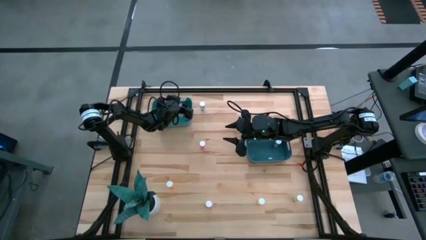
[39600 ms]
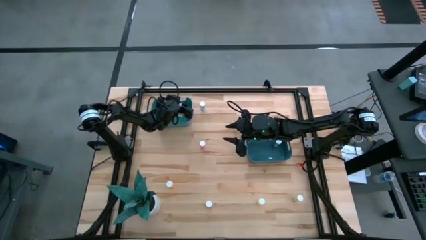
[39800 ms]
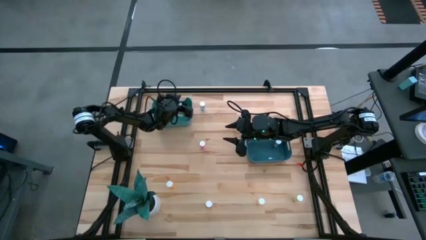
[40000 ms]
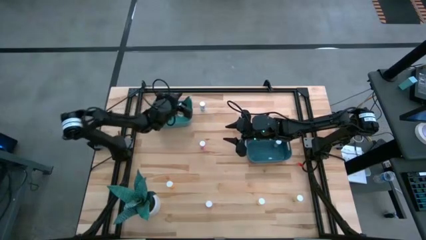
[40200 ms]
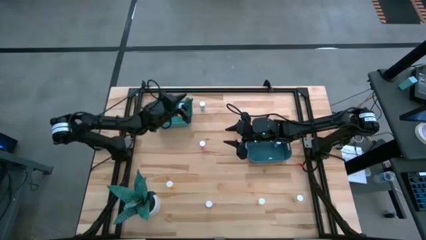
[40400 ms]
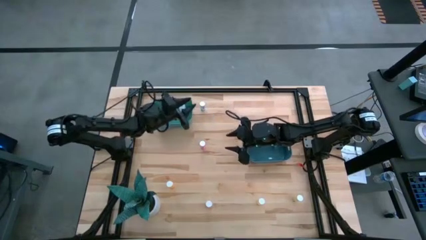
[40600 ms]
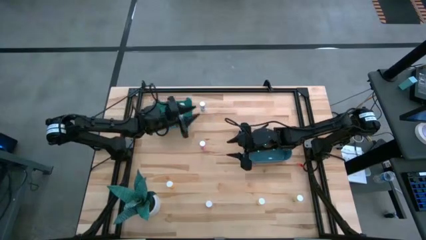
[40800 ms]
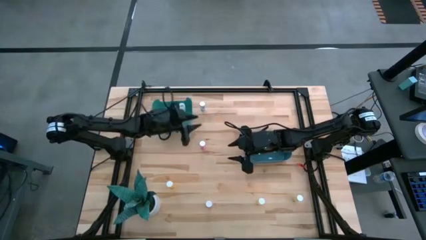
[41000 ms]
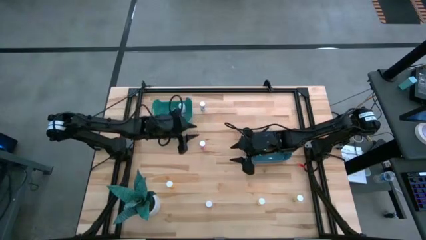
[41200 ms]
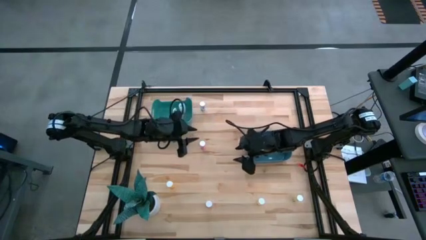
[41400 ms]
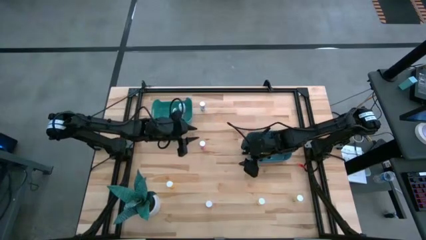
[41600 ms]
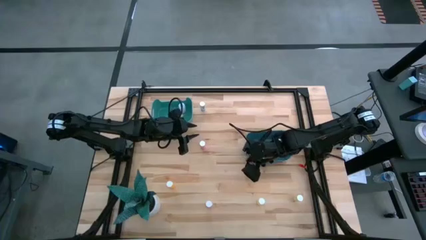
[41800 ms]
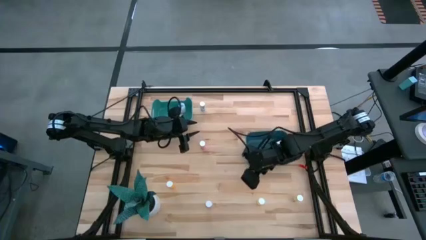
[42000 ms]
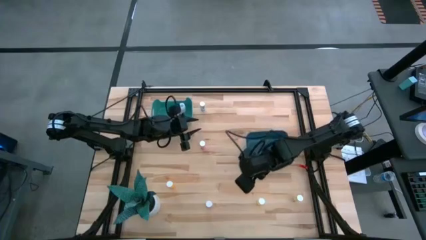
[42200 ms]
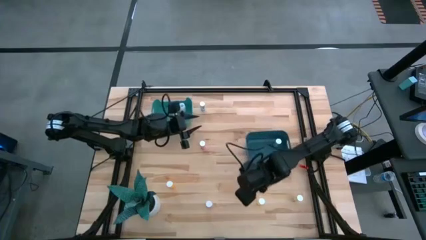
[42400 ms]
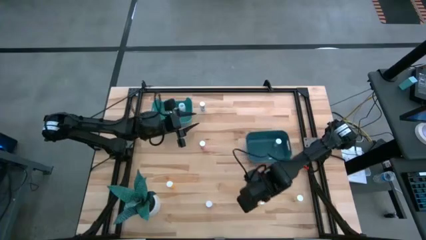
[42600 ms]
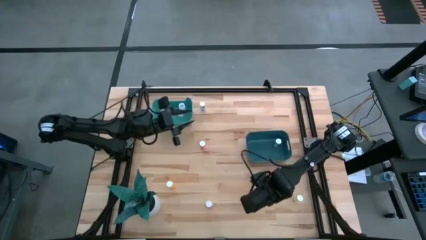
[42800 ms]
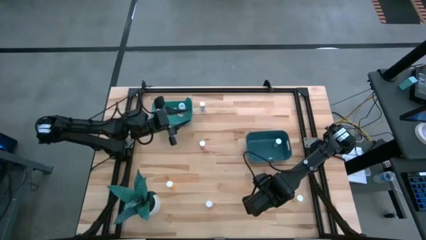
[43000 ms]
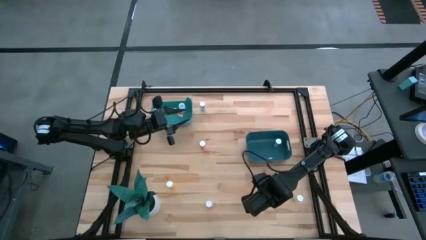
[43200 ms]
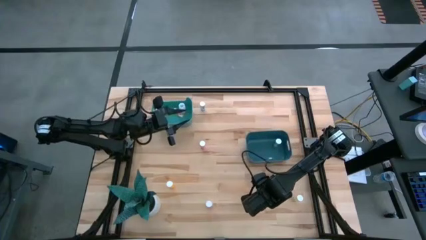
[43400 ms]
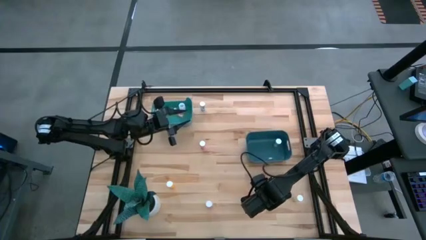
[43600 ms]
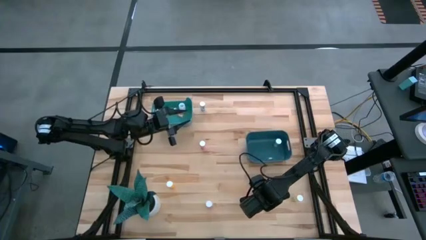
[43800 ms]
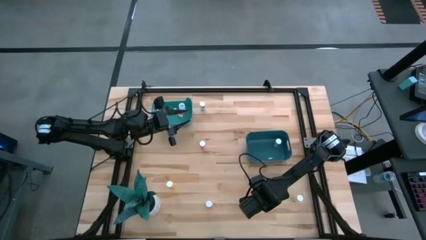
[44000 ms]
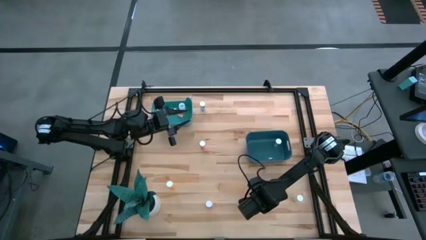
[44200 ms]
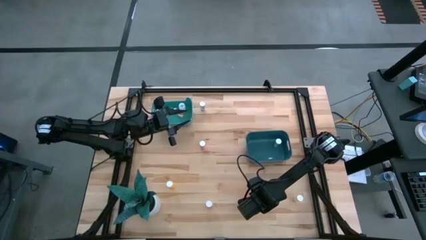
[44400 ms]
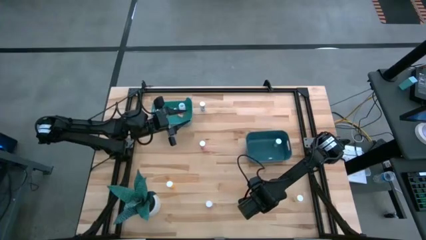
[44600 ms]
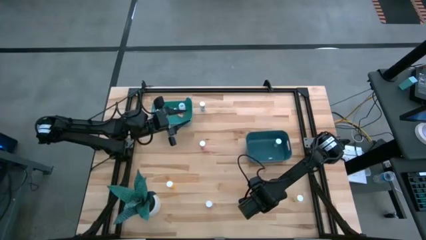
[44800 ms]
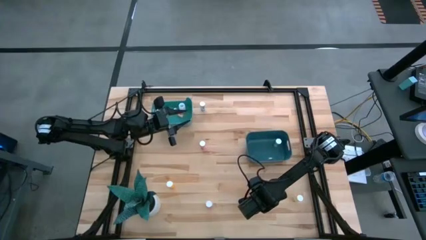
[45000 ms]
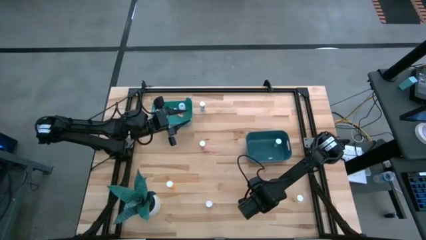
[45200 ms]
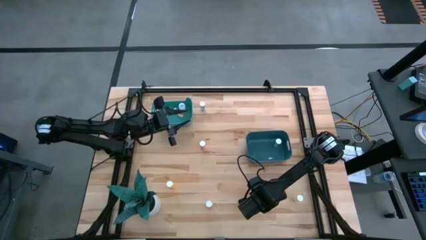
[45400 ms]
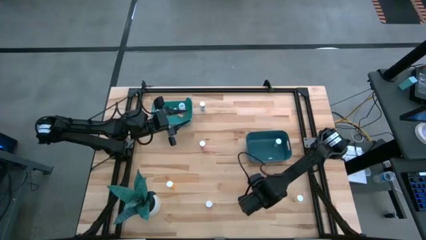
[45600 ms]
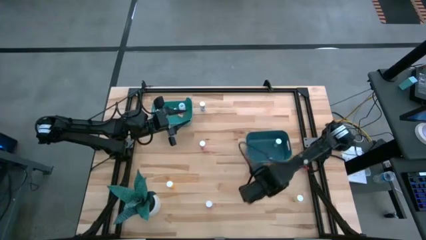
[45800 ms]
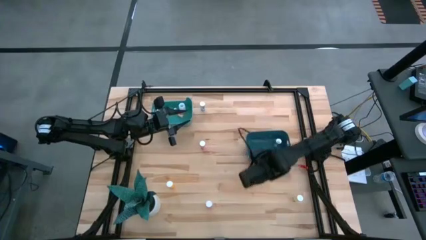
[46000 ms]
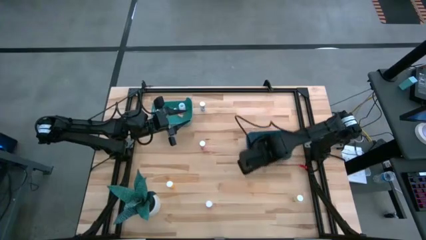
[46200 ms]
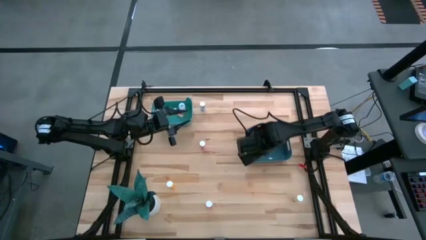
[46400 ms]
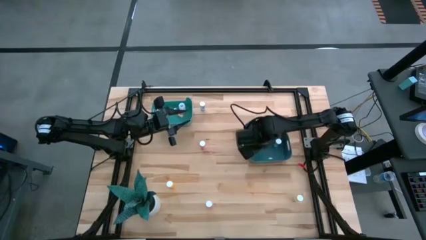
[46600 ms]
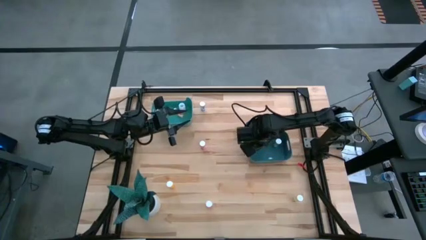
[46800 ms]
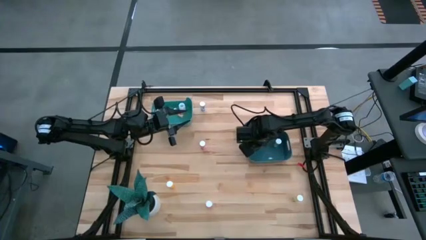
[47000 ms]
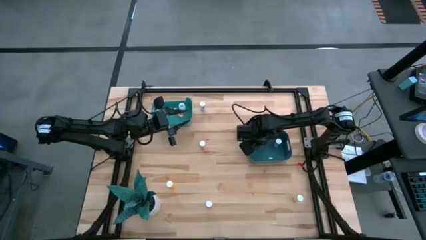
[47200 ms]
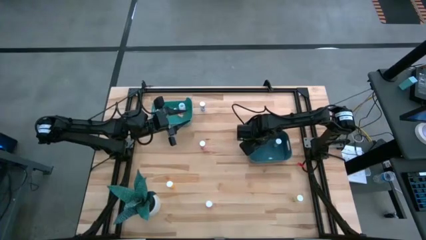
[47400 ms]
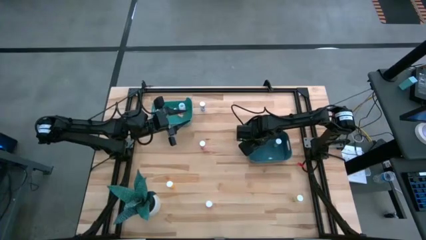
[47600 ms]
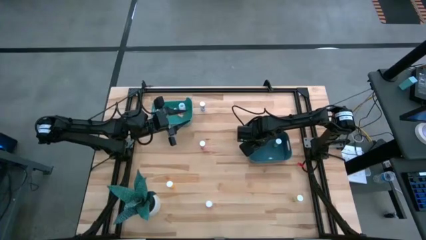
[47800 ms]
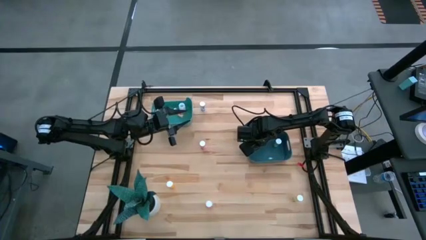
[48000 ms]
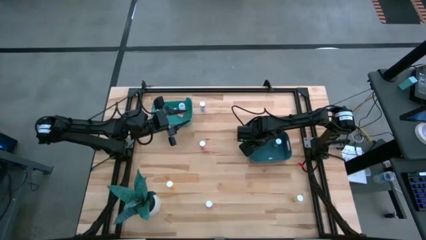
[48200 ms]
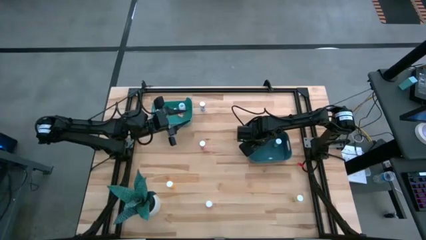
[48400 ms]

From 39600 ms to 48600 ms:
Task: Pick and place medicine bottles into bin by pill shape (circle, oval)
Put the left yellow tablet bottle into the blue bin

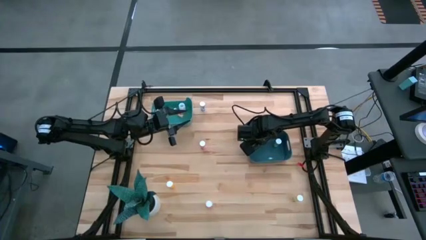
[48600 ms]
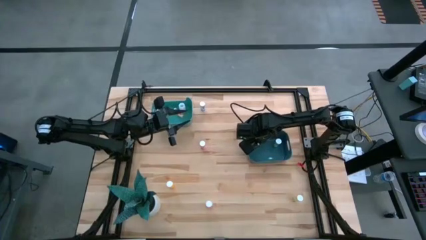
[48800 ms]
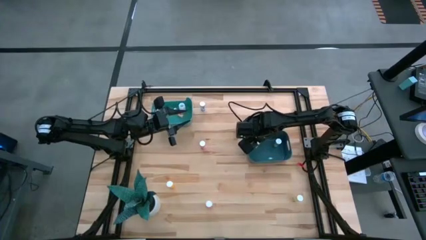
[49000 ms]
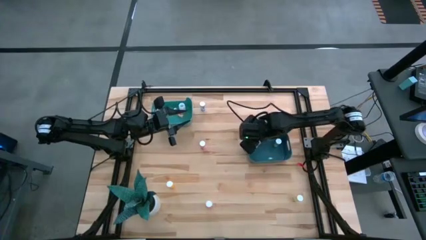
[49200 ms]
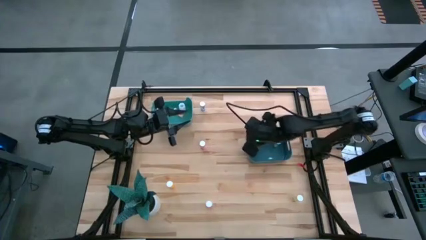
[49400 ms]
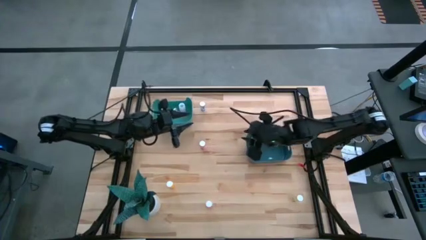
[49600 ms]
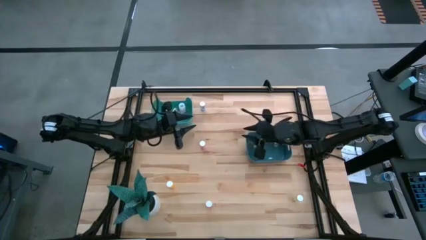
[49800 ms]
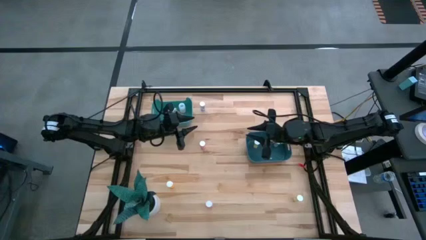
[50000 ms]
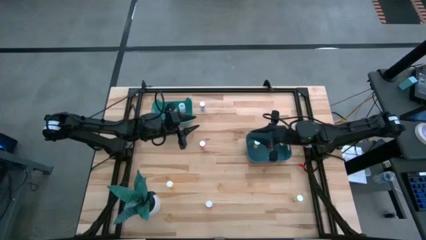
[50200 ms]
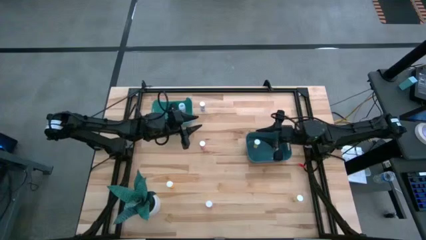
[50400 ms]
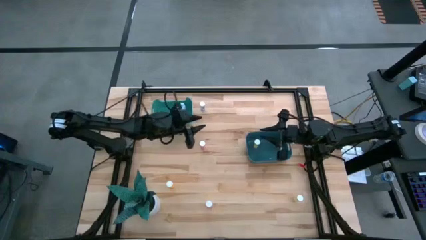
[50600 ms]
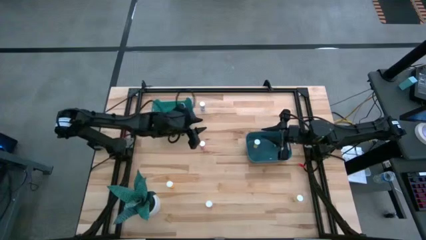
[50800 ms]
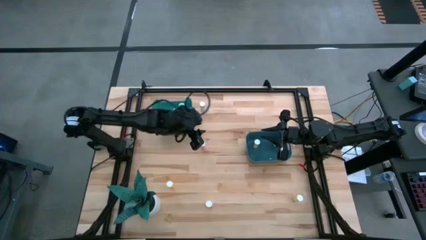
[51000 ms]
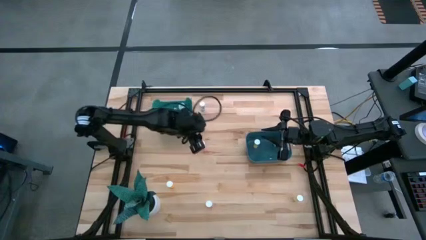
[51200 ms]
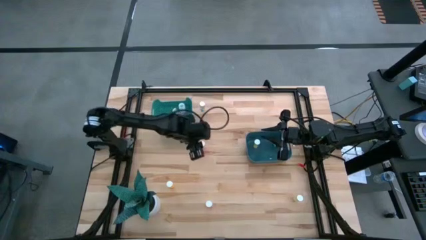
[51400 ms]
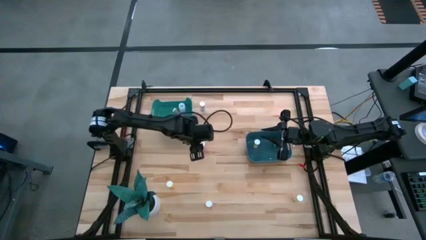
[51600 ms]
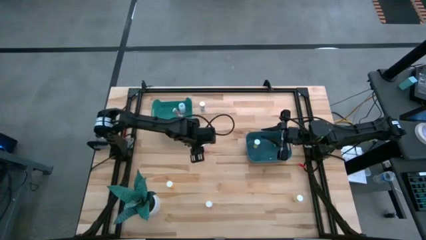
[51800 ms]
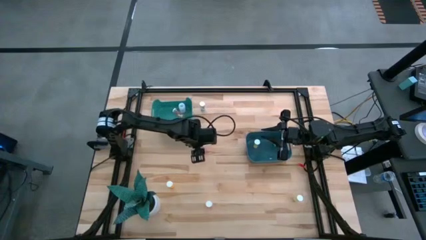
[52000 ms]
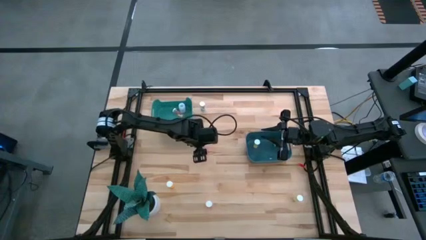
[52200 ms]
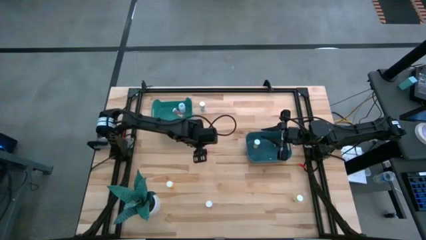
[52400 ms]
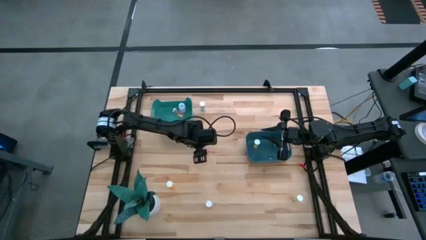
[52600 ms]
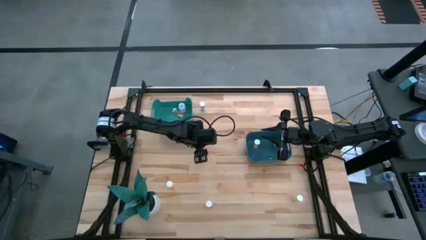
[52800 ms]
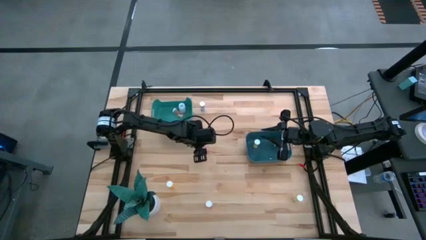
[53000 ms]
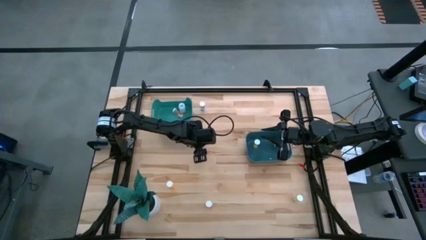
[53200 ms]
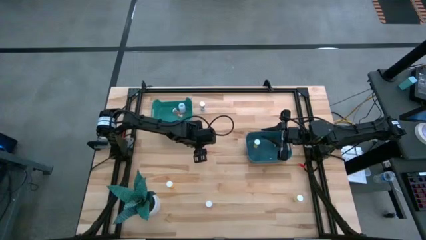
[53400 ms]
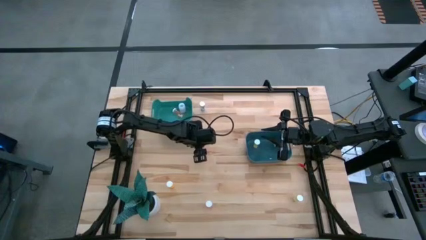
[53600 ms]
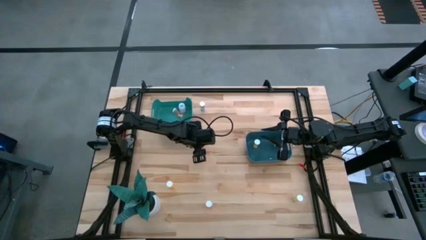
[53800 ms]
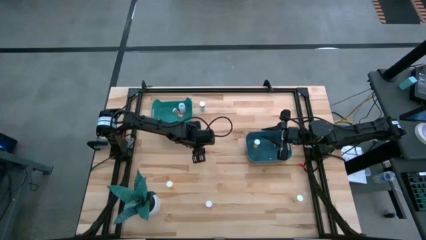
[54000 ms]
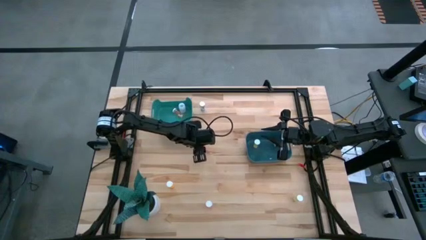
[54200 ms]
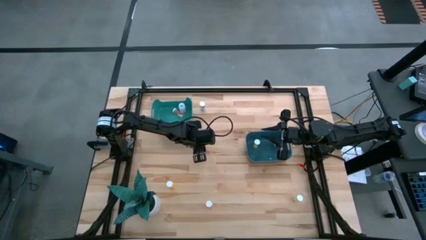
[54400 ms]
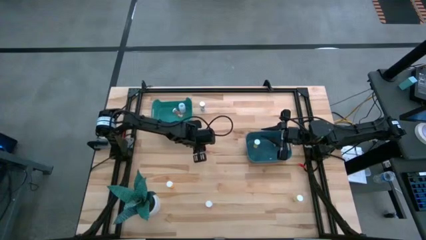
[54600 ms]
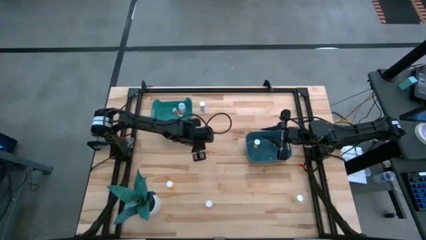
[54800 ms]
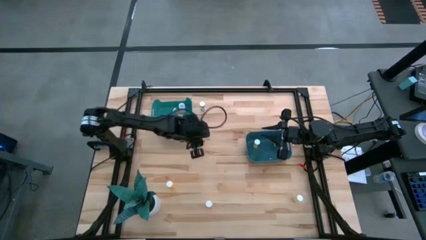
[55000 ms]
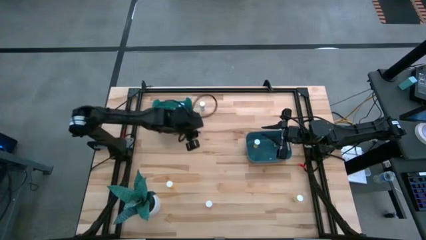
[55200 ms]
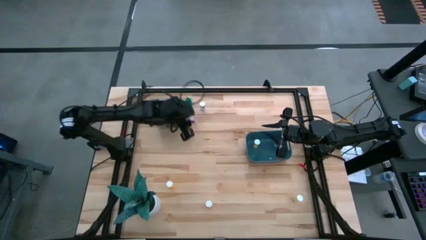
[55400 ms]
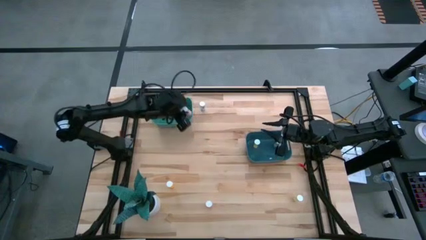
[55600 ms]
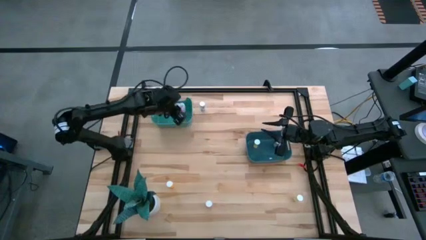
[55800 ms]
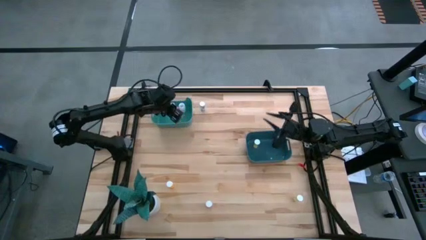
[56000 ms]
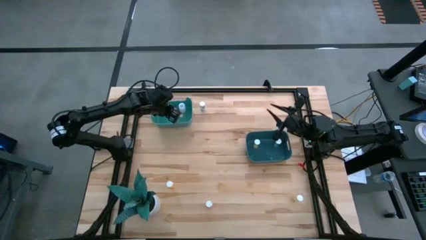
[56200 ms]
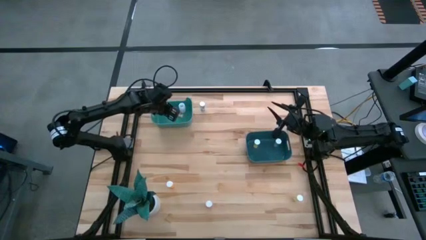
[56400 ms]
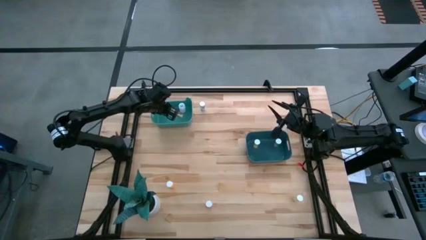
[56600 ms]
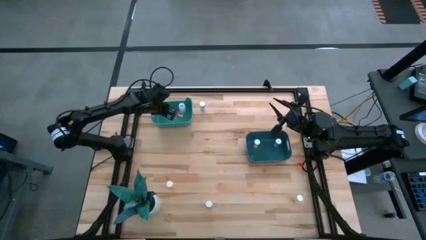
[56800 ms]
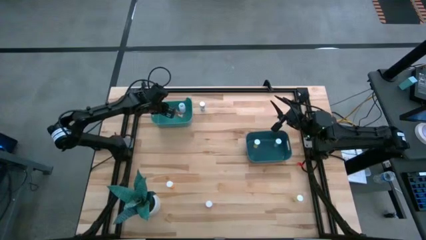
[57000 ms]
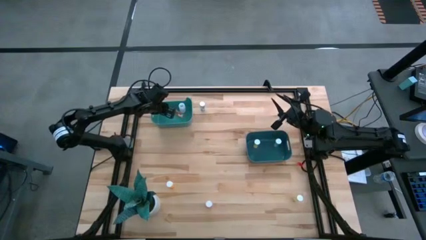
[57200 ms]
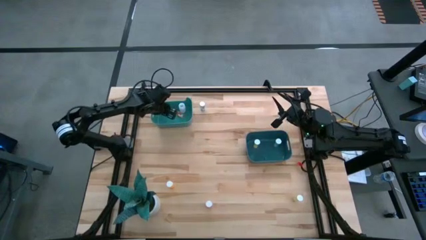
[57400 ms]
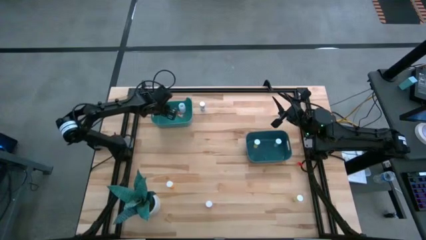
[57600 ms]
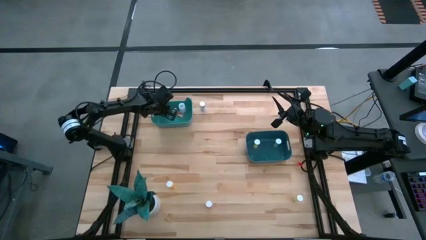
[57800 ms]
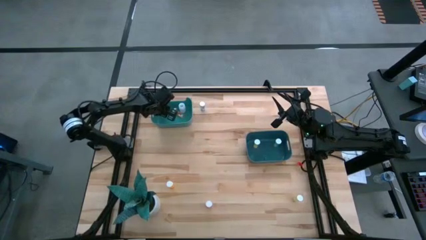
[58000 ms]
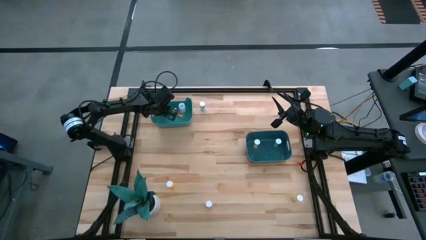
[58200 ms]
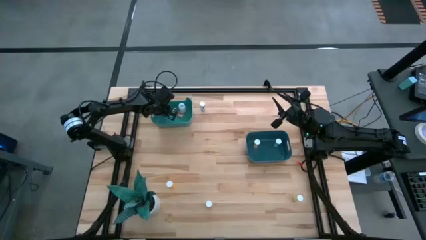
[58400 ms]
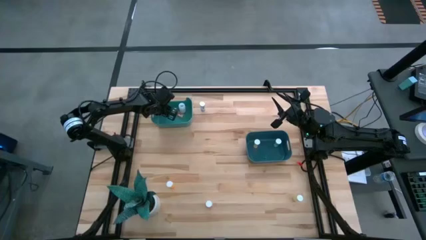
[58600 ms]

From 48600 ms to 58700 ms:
Put the pink capsule bottle into the green bin
